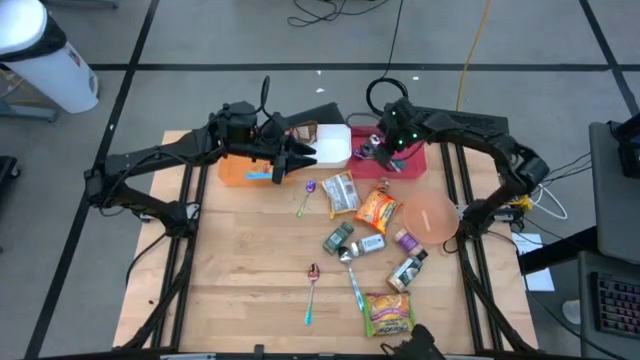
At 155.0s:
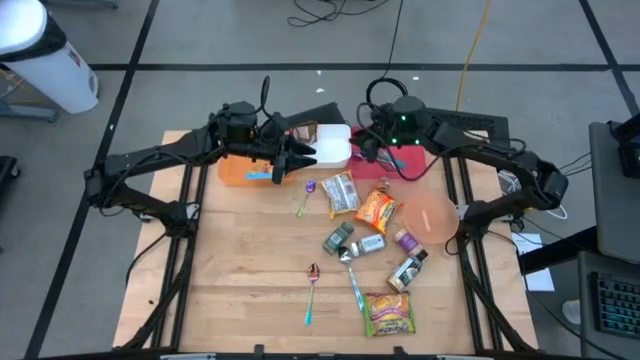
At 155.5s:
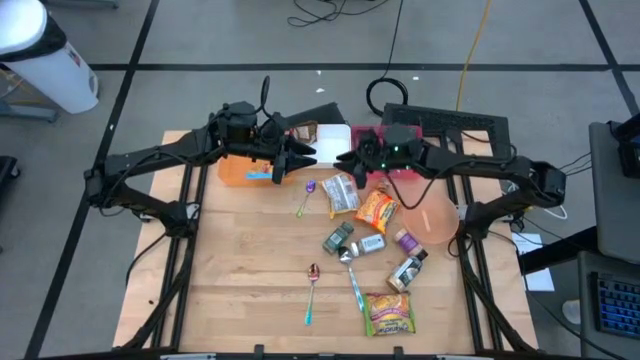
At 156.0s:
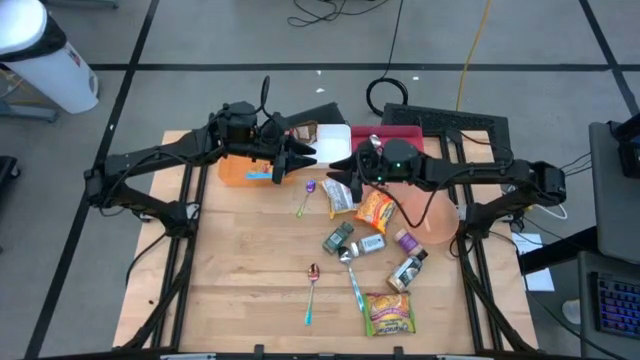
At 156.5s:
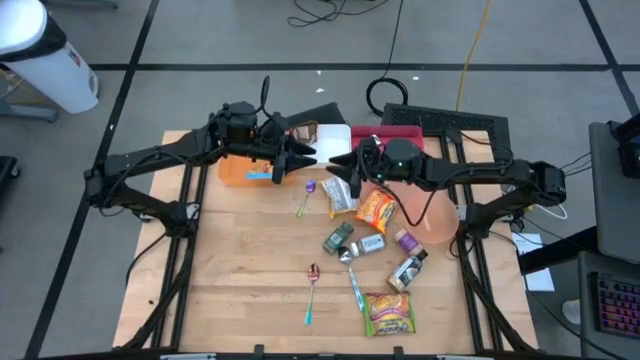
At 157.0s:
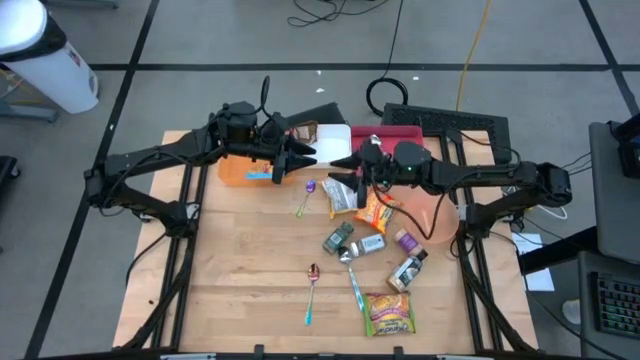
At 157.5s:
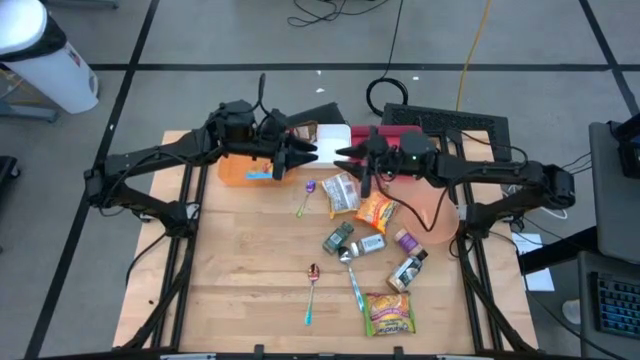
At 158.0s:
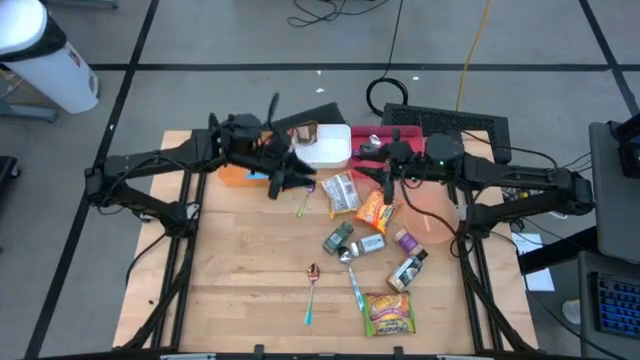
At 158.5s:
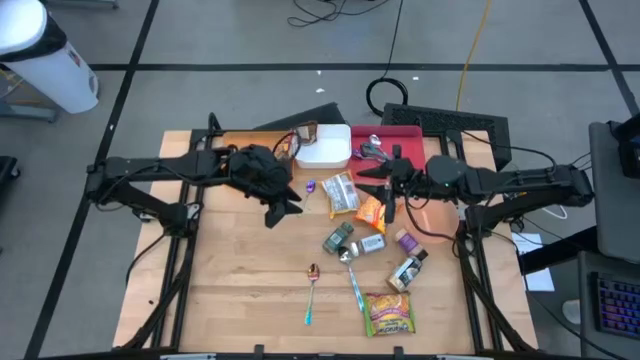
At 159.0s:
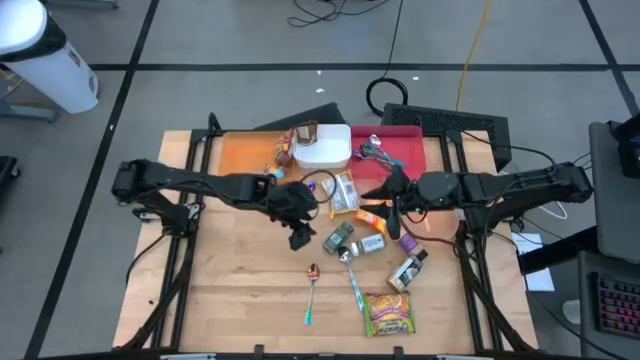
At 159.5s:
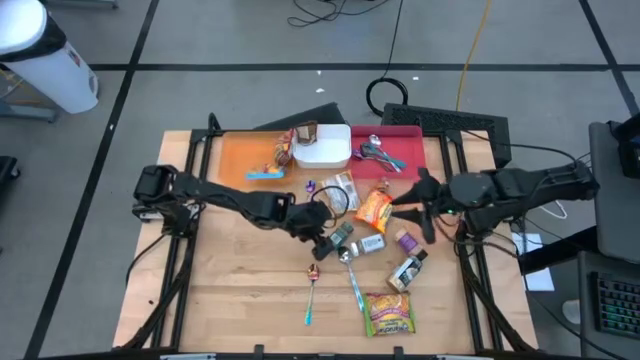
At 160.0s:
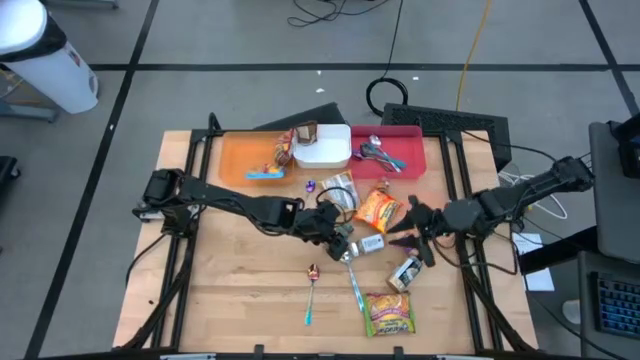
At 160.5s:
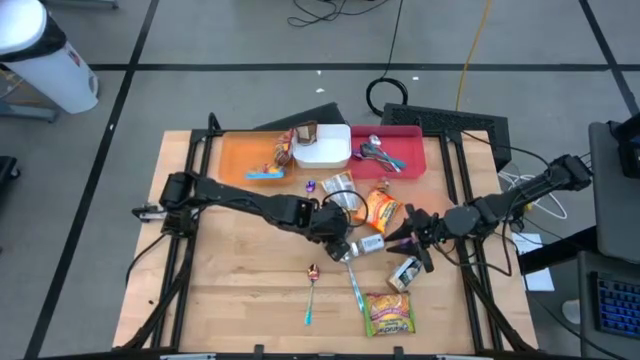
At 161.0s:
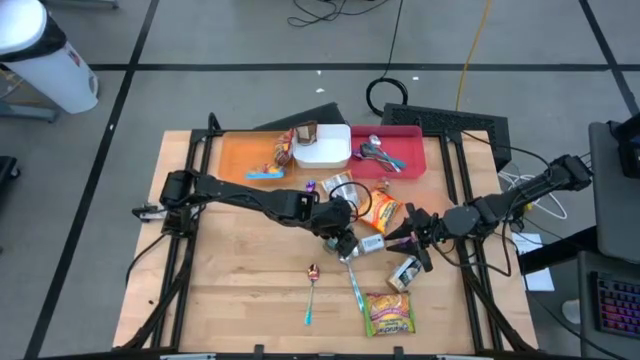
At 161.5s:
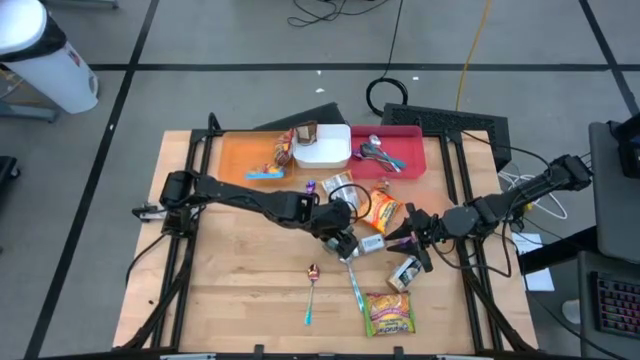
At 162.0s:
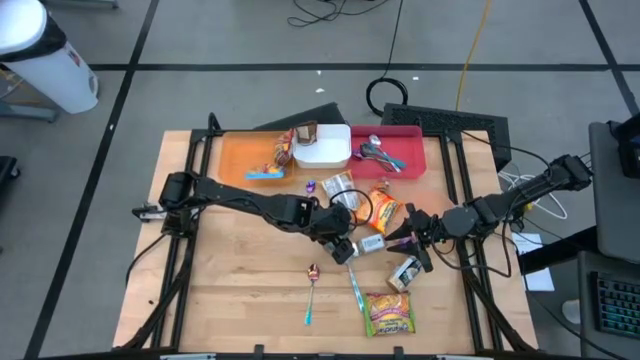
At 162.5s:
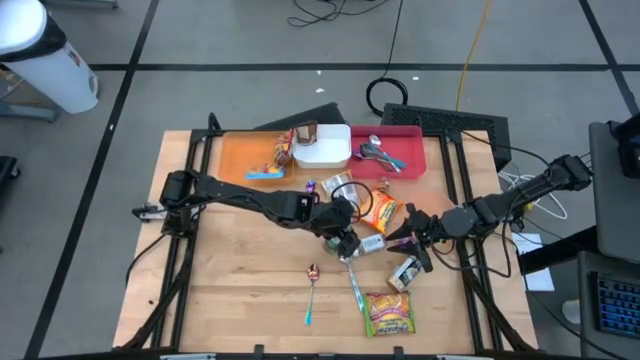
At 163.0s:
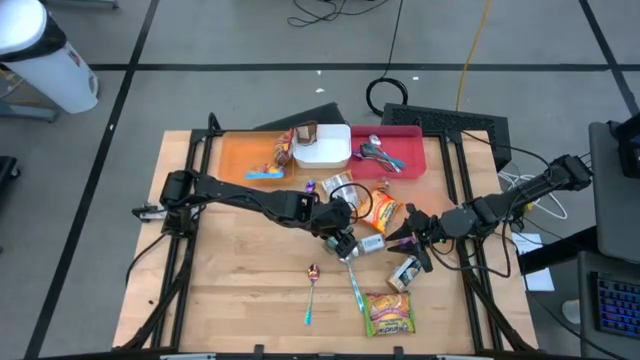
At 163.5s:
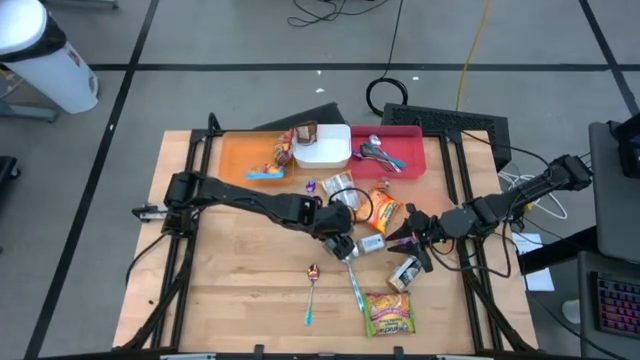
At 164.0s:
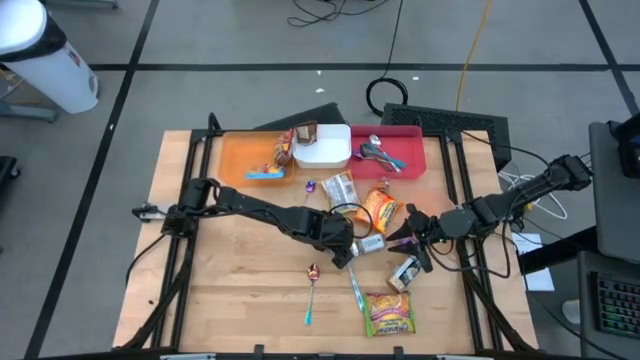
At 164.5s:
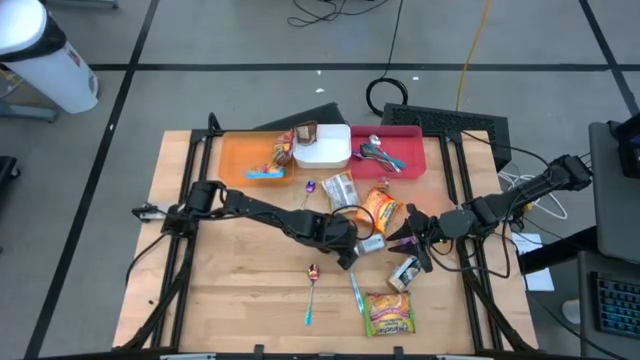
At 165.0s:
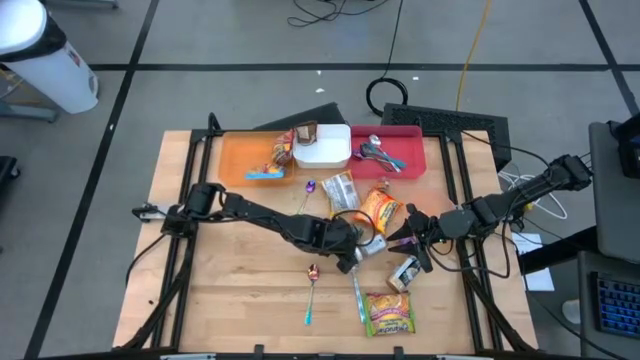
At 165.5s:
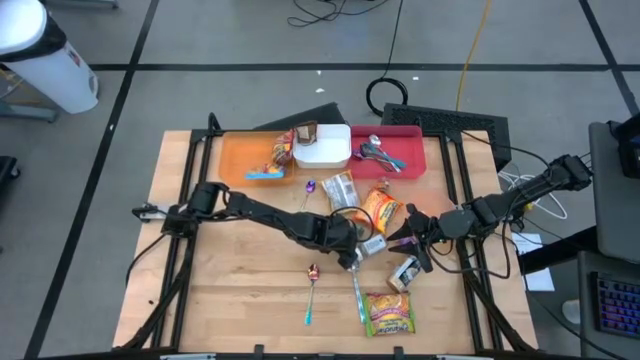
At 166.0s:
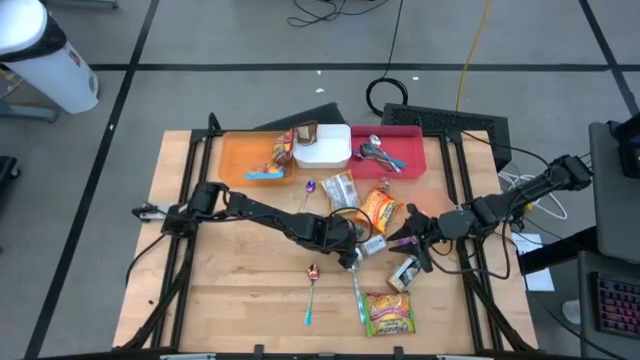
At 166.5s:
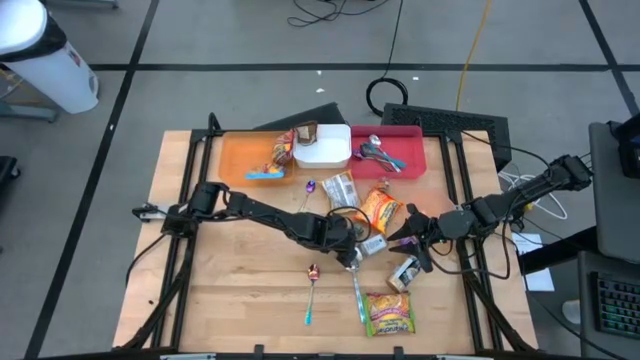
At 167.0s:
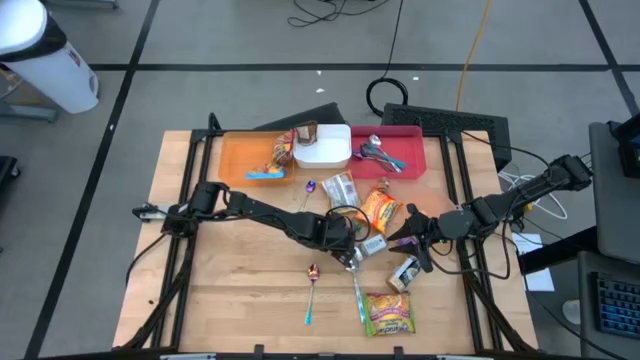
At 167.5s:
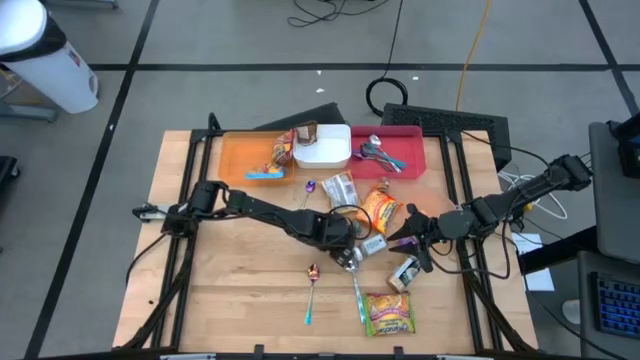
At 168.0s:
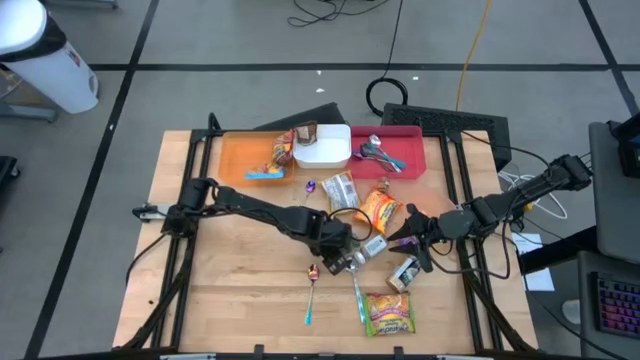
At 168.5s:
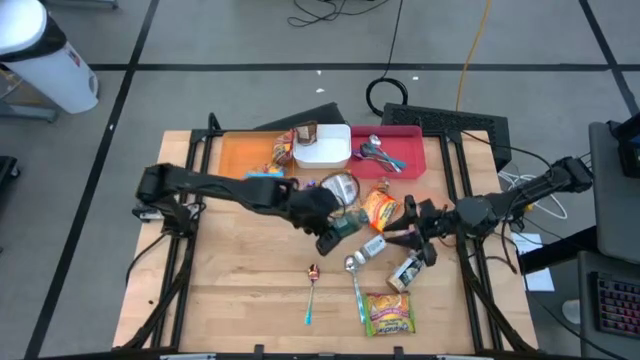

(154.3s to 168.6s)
Task: Pick & Place Food Item
Put the green seasoning bottle into the white bin
